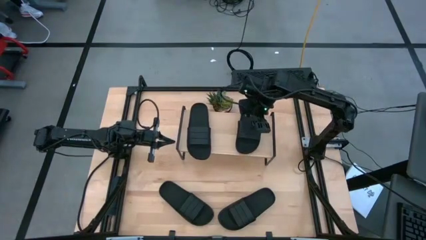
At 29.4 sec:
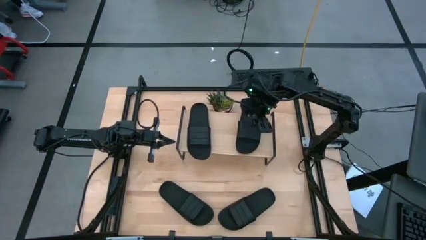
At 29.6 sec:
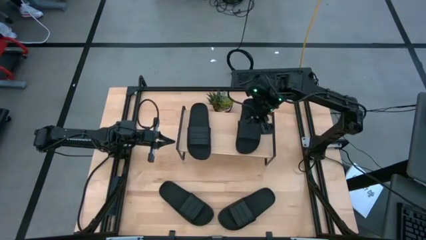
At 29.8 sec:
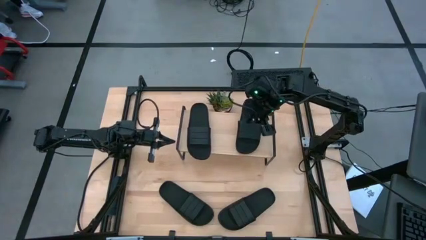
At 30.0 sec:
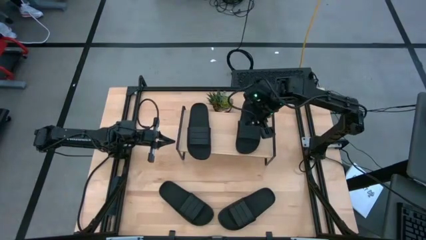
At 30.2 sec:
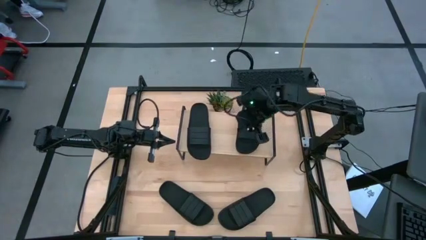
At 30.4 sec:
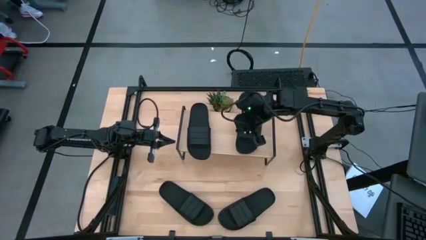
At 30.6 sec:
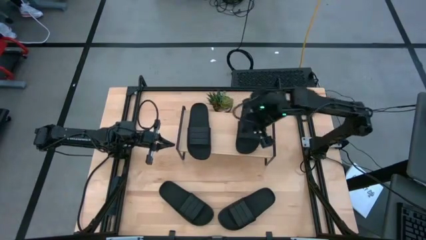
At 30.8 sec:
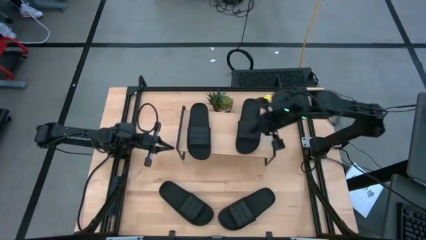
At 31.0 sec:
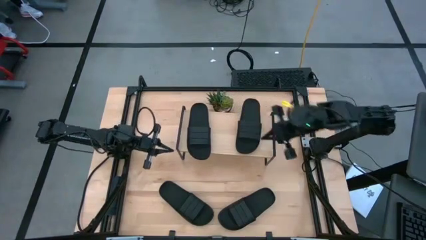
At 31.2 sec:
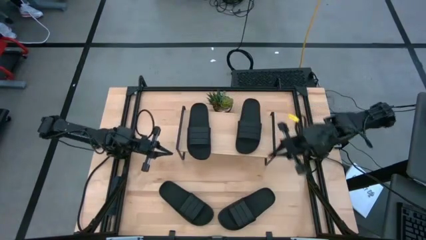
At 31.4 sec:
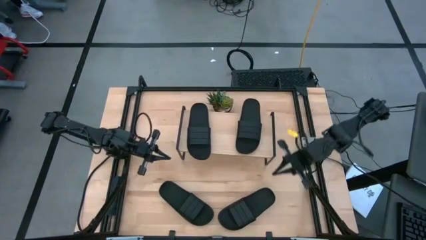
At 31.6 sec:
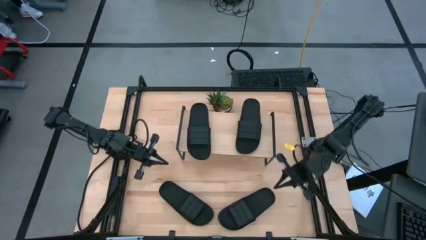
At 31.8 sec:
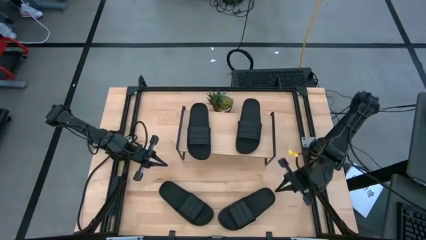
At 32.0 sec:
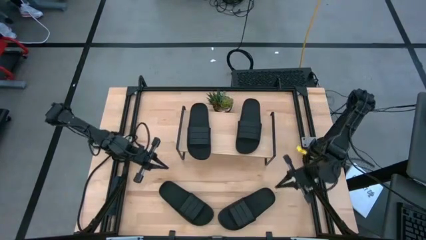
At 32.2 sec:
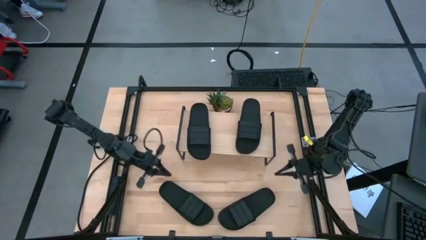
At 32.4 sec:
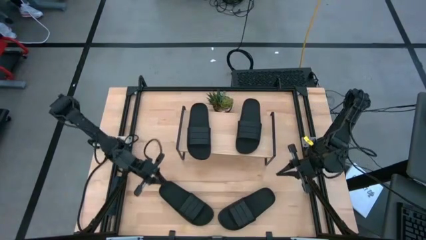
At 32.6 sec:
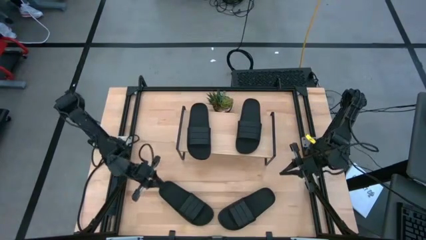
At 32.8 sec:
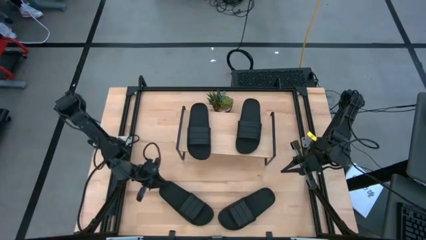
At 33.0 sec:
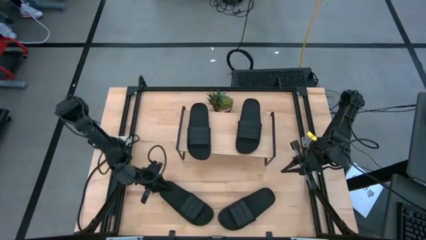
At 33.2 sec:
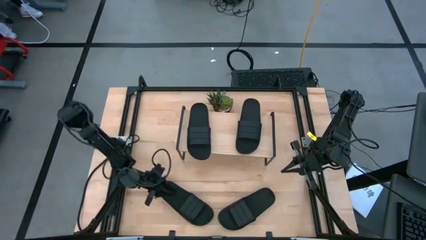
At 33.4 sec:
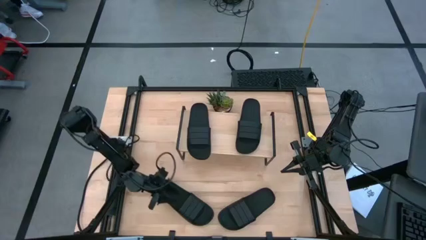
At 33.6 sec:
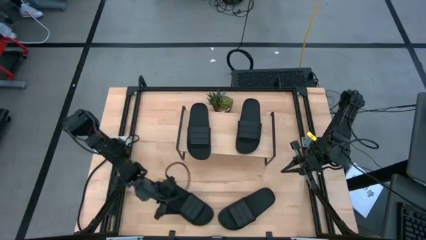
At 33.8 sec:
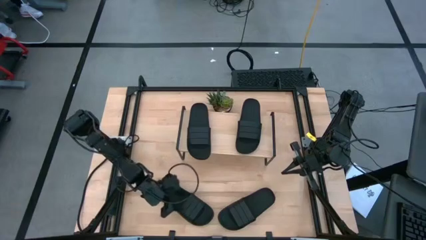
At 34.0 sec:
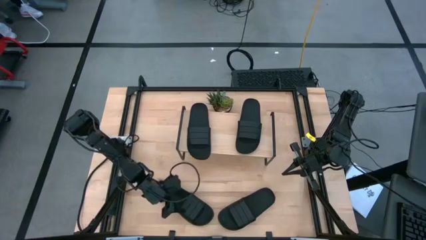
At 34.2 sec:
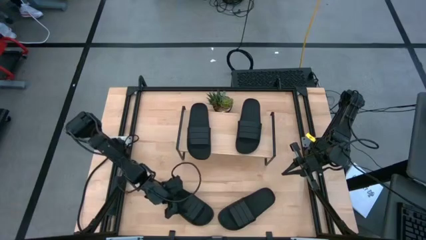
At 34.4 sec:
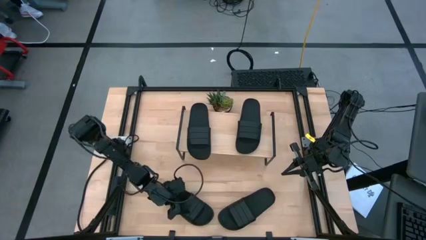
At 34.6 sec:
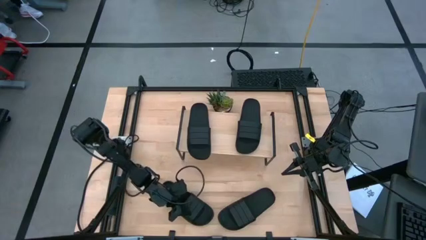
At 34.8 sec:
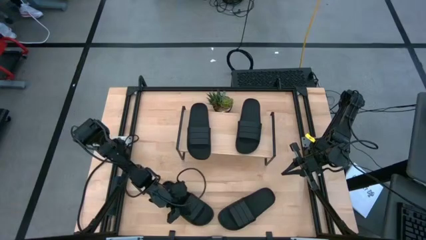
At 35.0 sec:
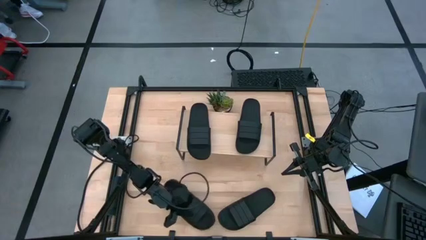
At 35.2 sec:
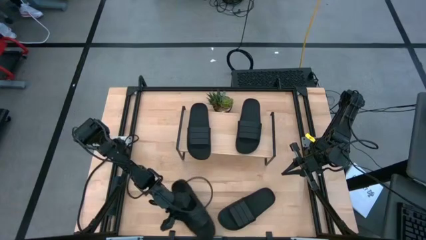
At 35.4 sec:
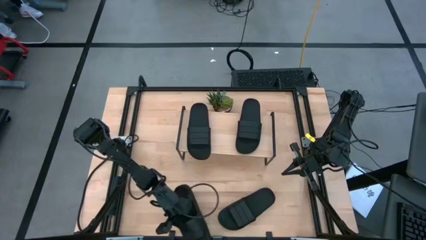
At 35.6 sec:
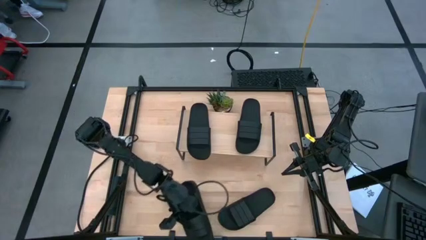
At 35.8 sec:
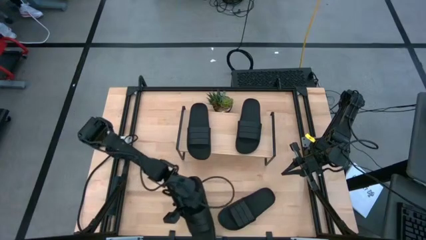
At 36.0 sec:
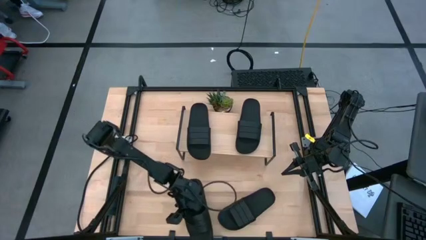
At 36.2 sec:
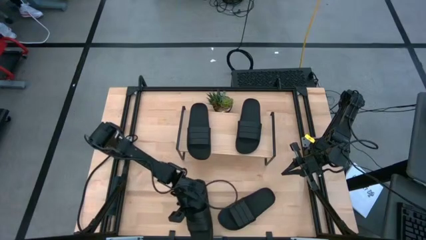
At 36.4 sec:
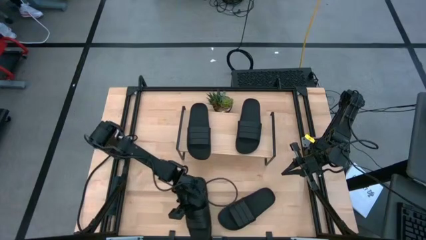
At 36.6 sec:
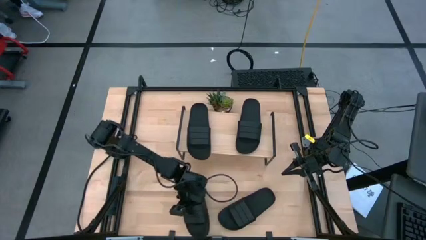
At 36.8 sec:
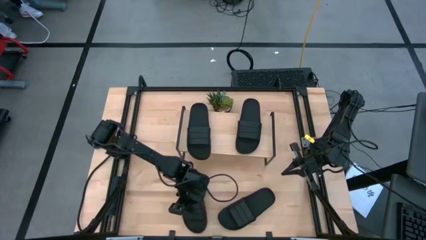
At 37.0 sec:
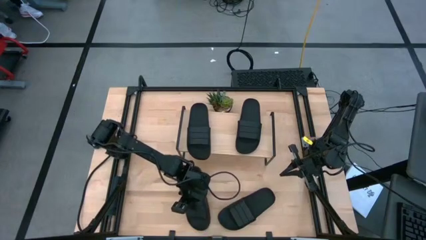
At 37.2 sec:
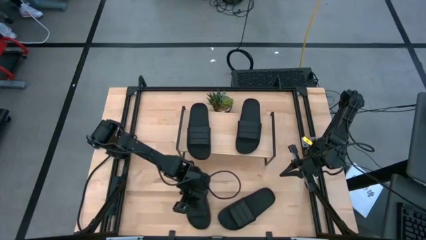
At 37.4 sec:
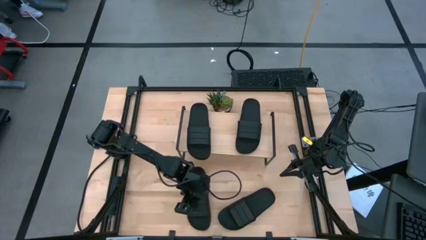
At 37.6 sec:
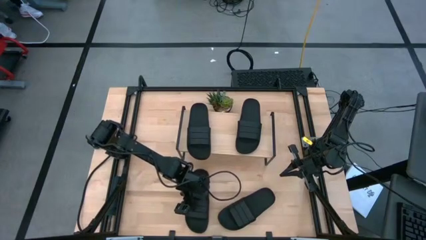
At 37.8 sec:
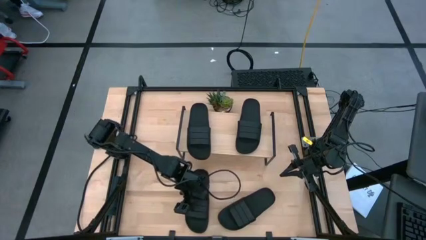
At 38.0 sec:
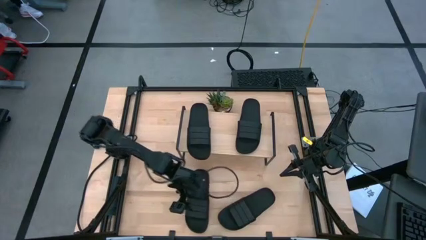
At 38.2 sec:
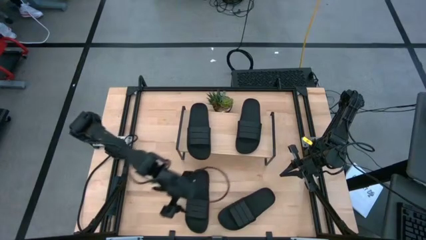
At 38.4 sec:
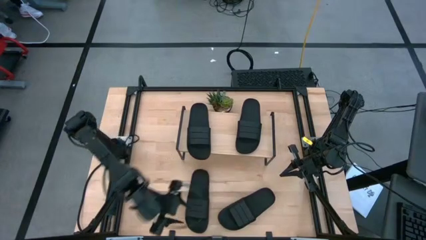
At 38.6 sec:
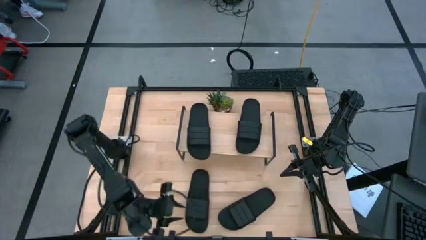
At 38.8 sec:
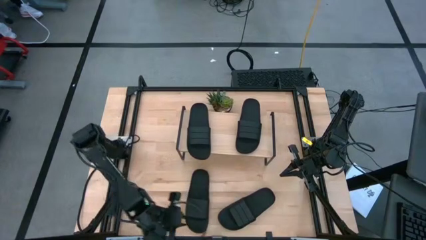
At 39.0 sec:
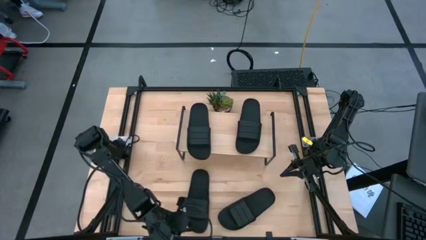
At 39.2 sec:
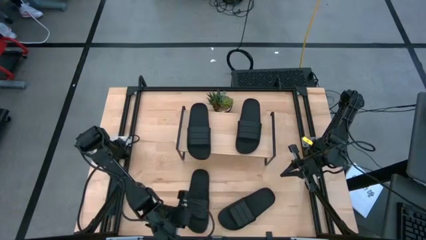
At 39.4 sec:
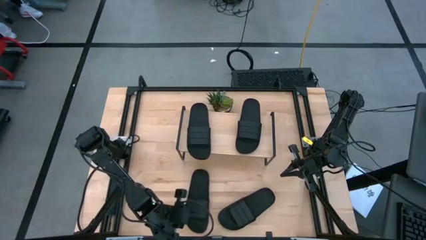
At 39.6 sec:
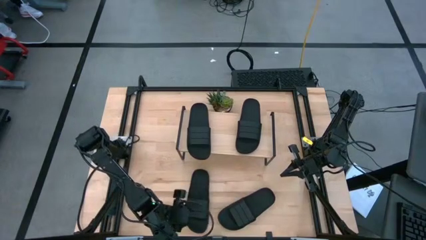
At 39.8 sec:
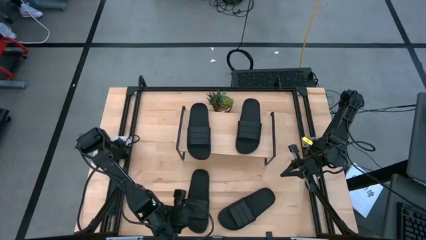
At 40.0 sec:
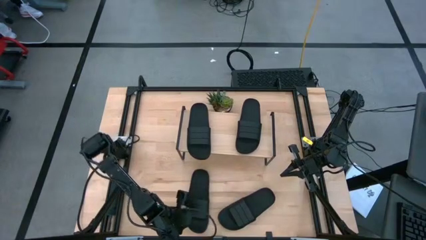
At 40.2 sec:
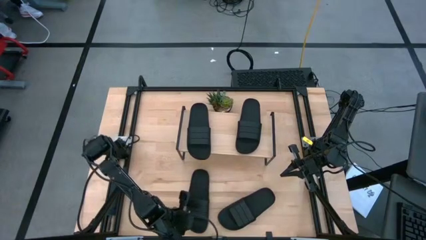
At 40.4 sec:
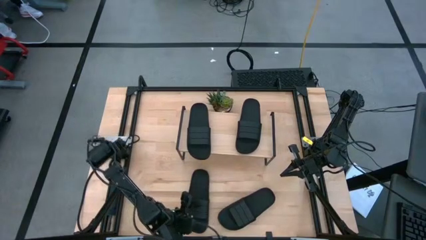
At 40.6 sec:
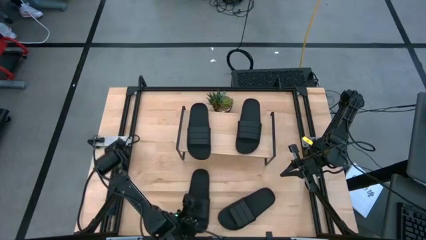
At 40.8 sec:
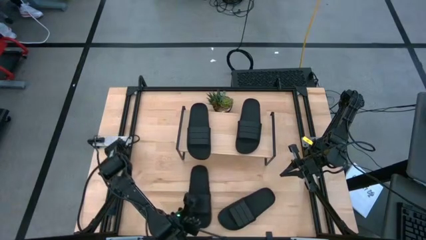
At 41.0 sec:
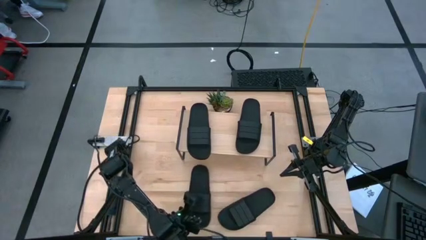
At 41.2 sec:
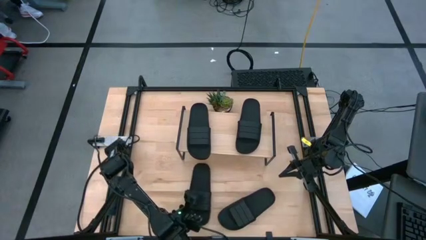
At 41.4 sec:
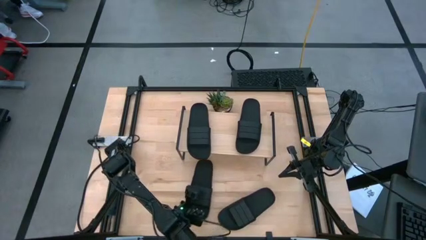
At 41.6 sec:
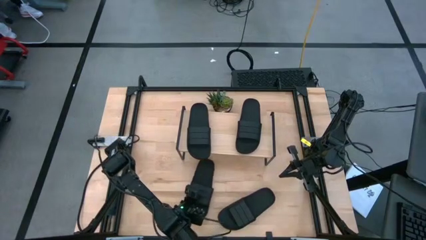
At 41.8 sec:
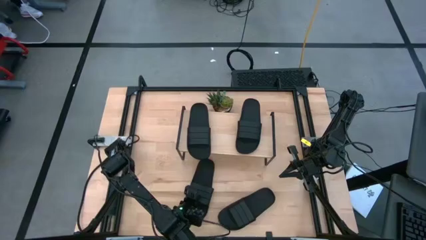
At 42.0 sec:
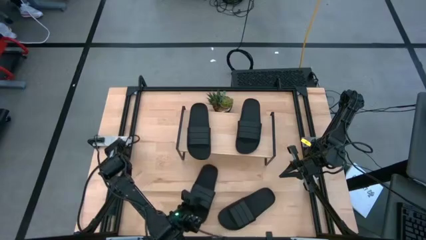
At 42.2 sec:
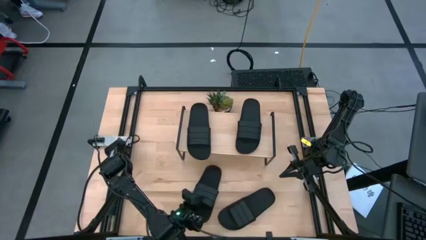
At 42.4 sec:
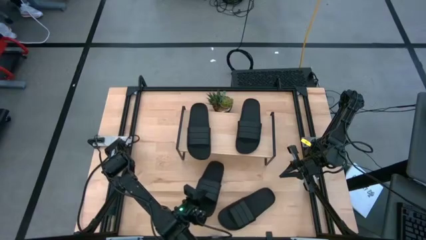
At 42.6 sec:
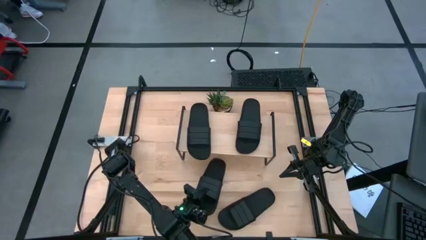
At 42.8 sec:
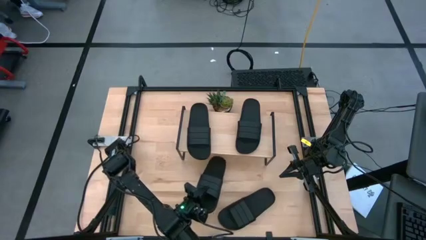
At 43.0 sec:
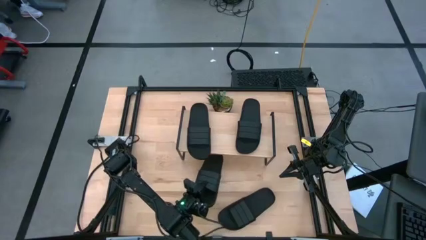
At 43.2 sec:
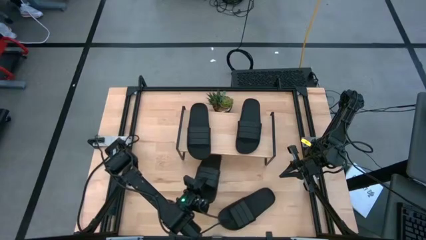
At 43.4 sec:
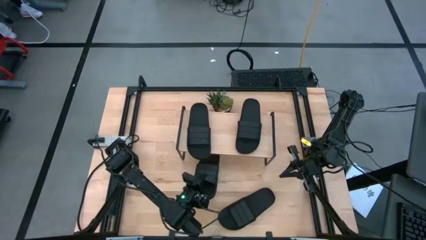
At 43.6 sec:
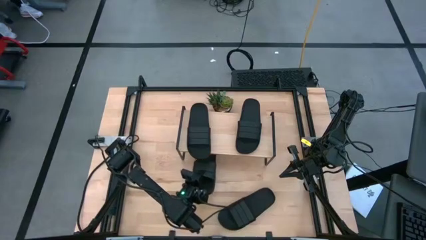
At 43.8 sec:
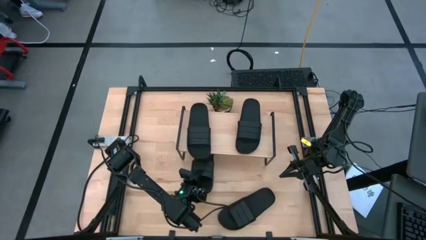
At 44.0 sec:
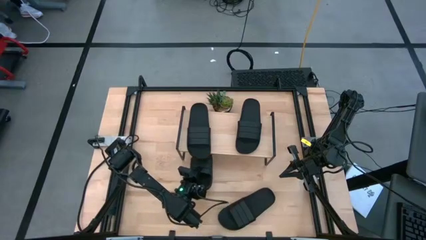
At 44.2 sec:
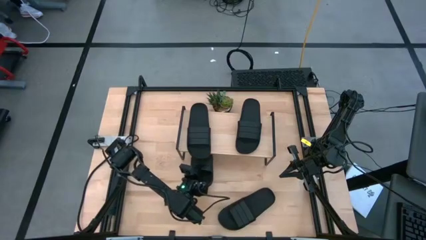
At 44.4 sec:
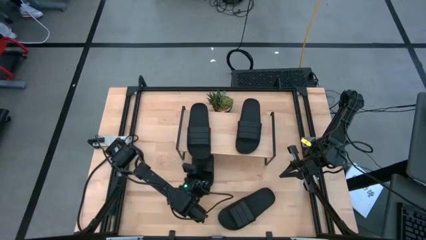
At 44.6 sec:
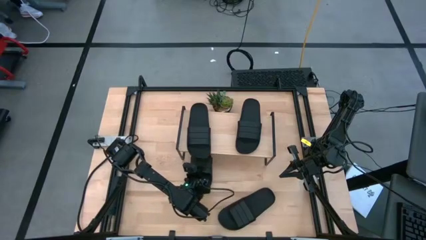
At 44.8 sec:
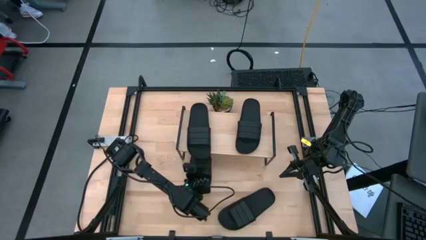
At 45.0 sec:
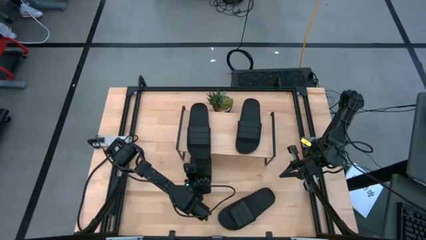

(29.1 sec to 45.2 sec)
Task: Pick and place slides into the shelf
Put the black slide under the shelf
